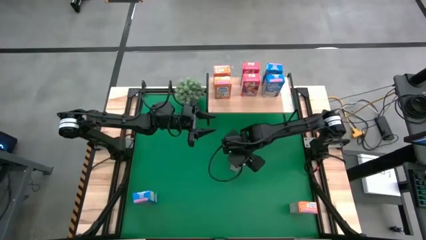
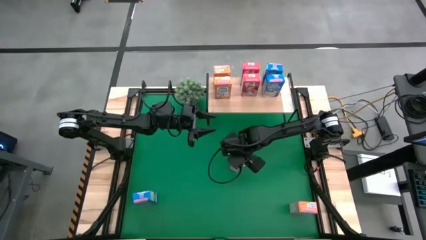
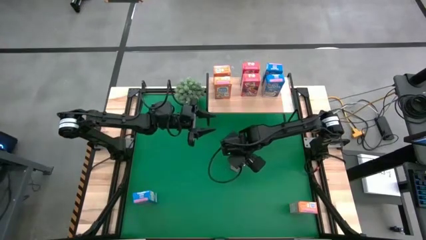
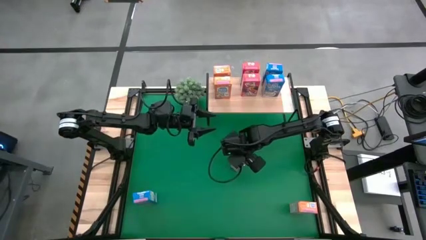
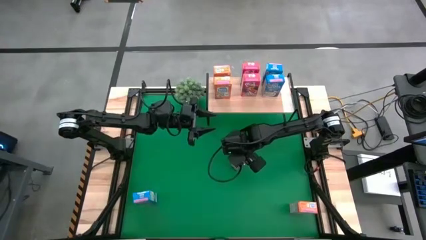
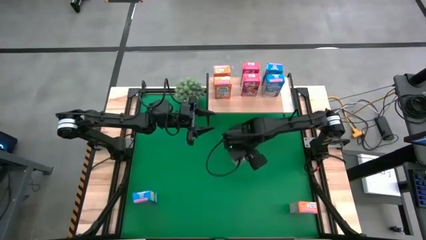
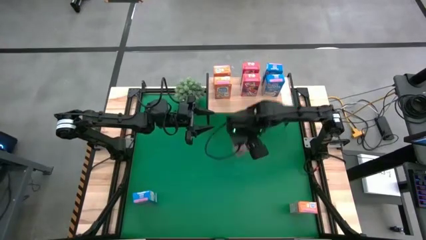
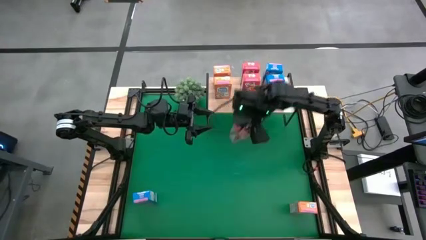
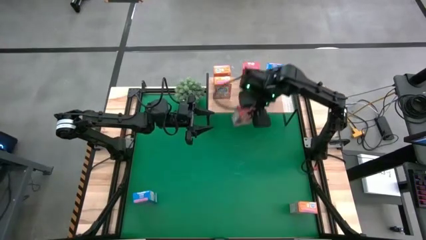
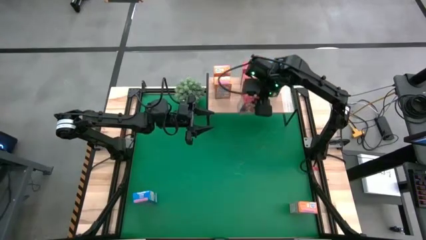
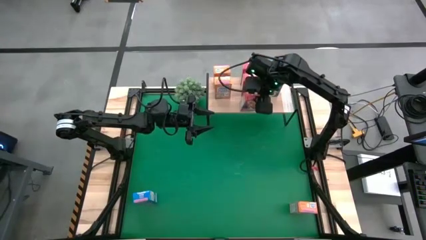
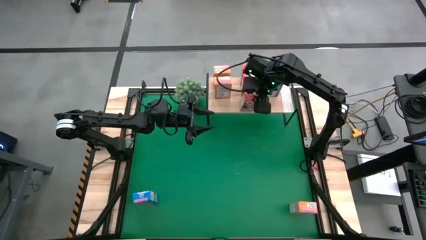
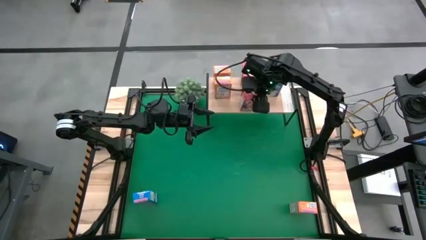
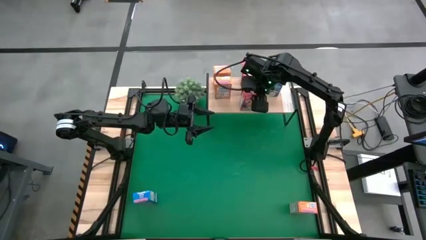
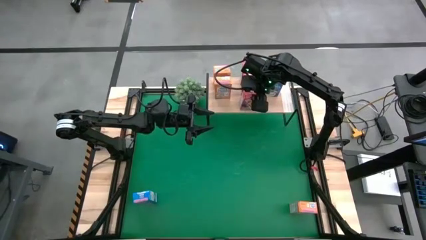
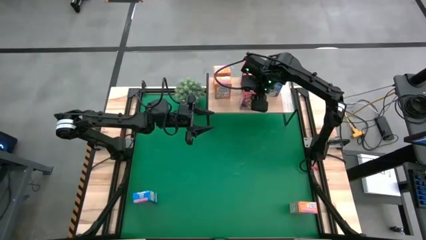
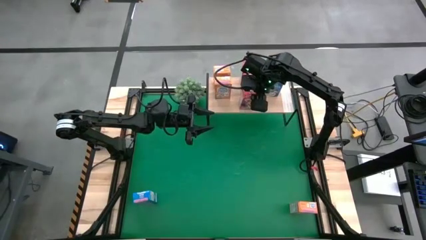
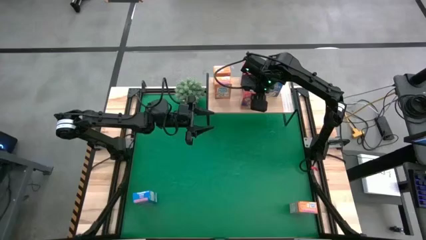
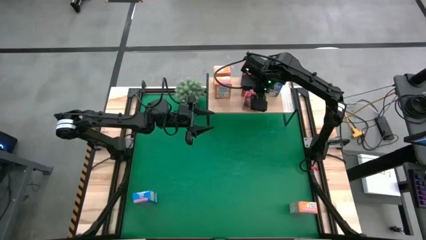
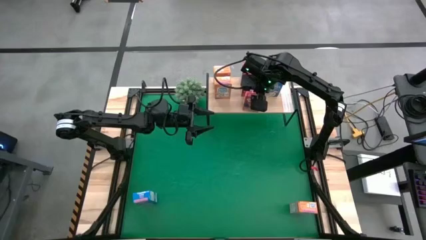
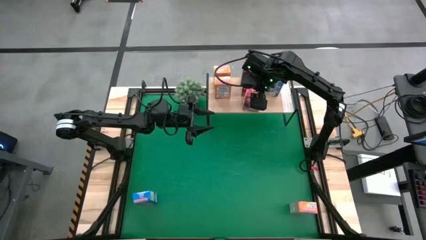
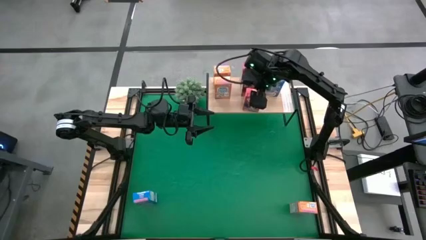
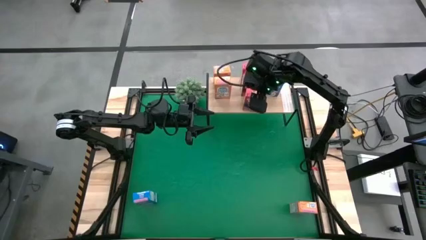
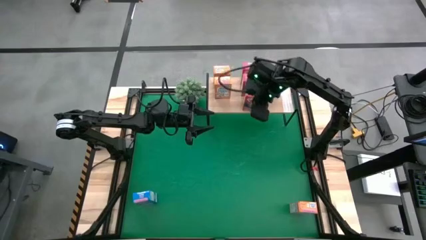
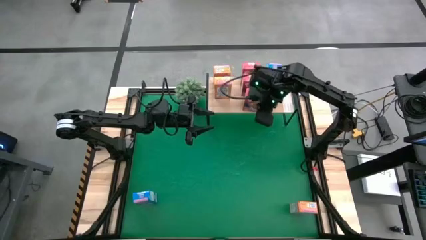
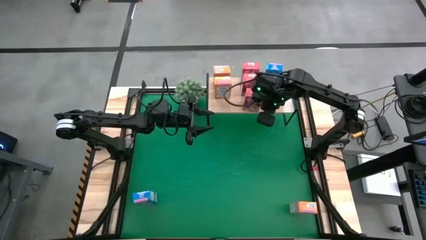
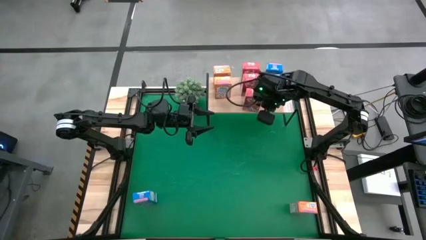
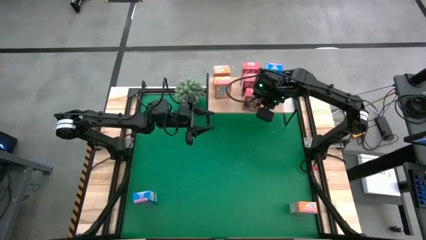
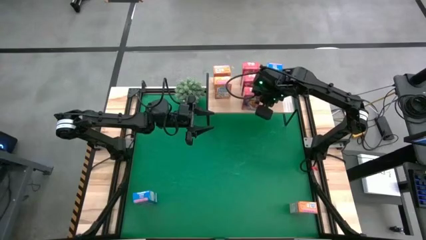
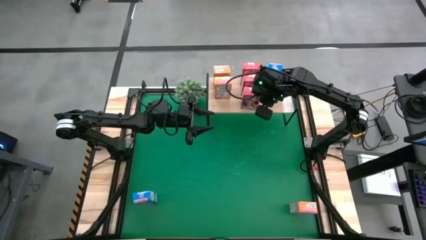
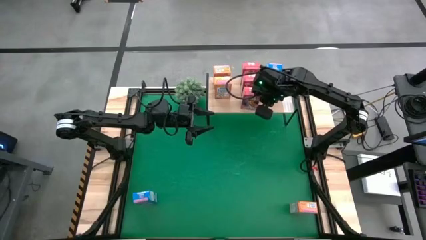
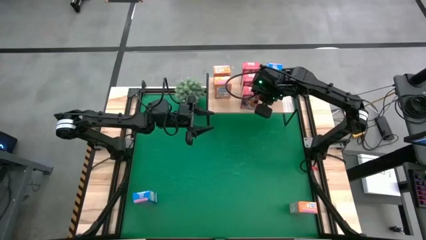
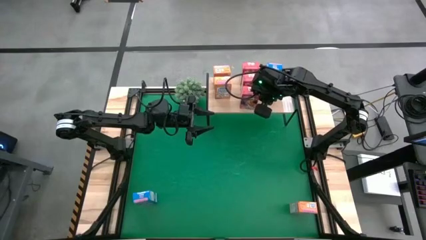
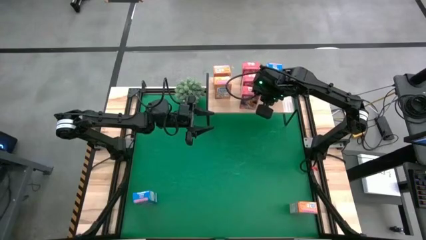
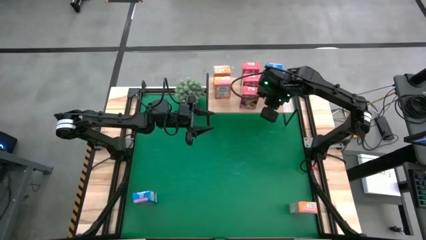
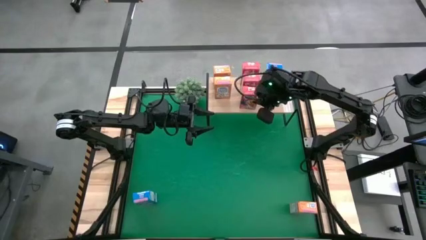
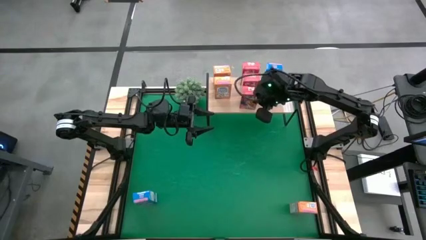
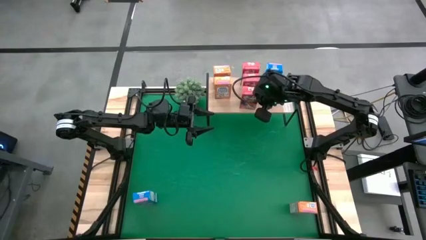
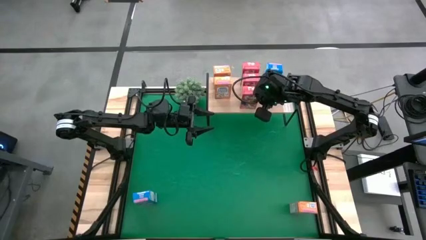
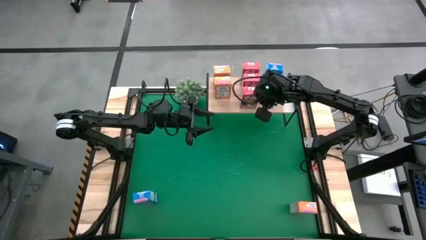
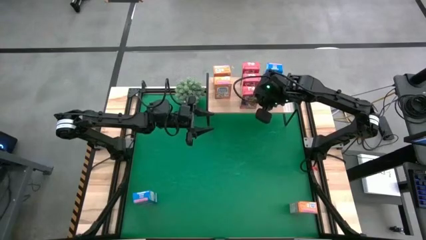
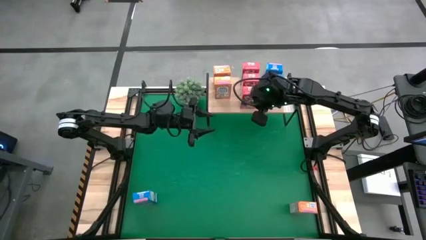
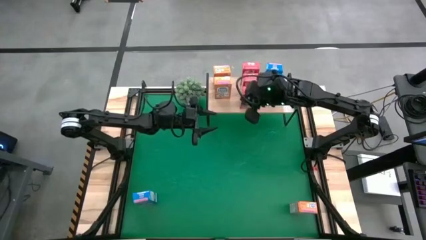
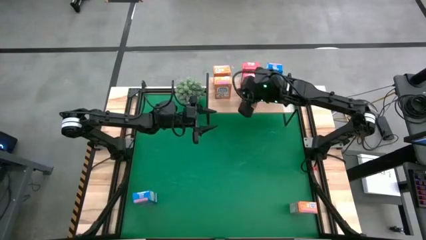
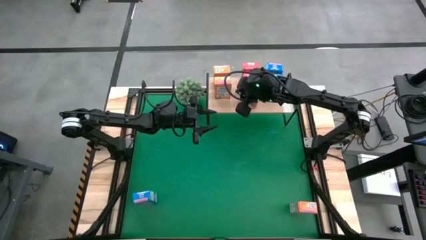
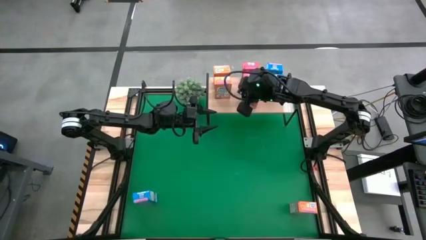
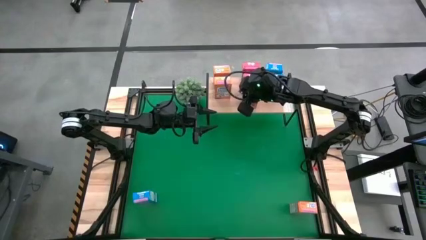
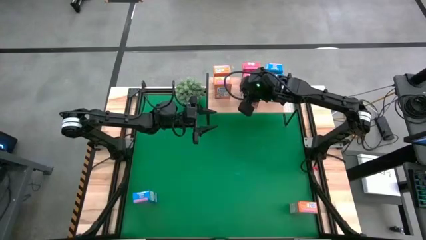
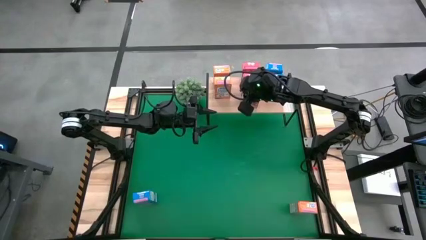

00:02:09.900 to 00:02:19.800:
Task: Stack cereal on shelf
Put the red cereal box on the shelf aligned with the other red cereal box

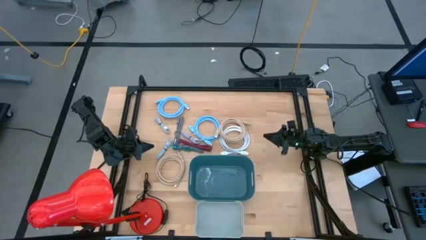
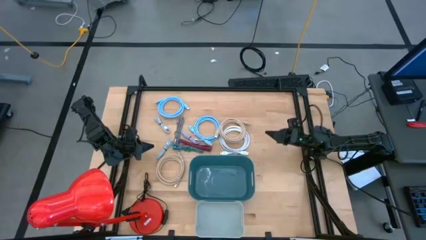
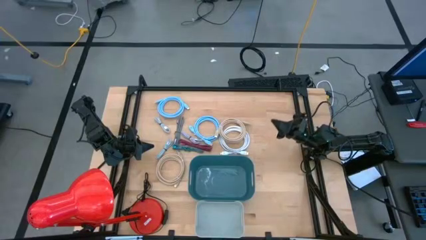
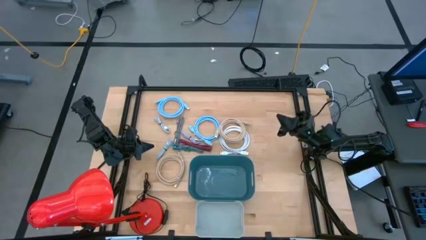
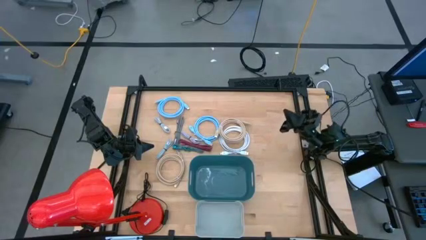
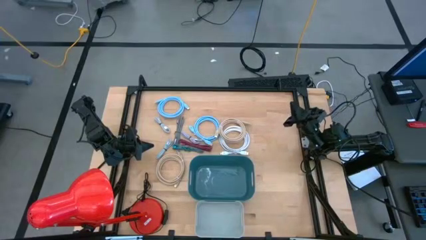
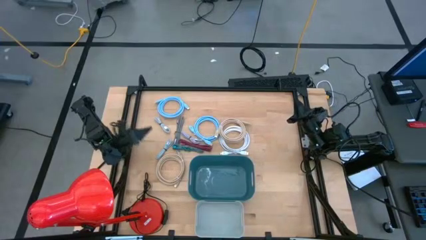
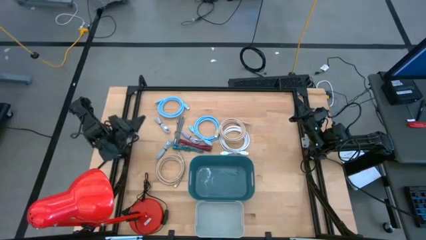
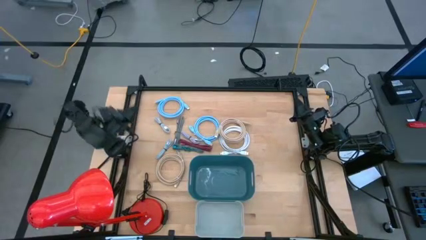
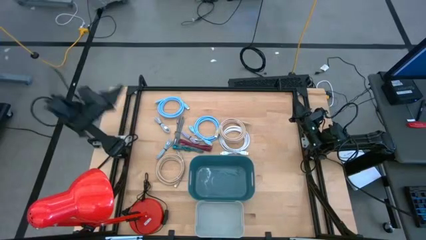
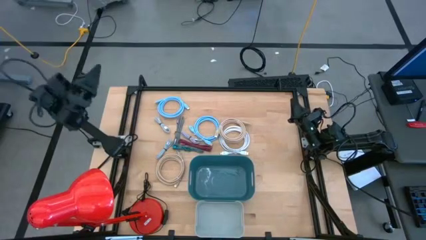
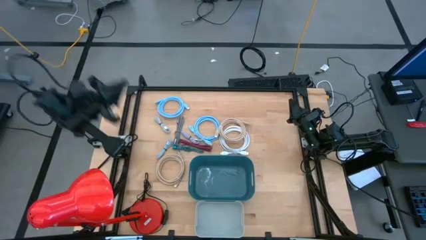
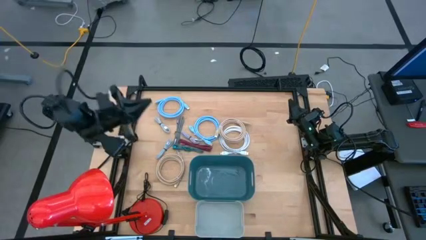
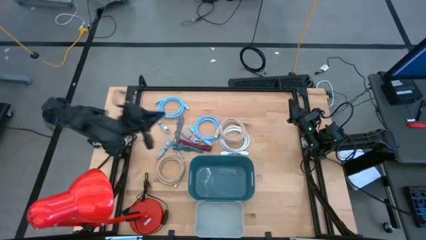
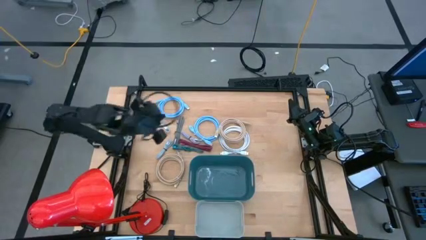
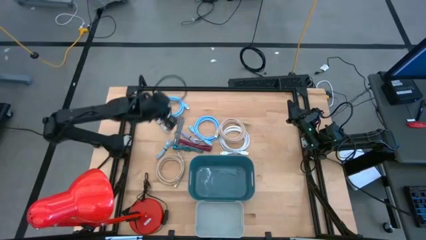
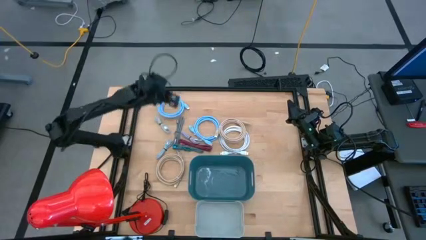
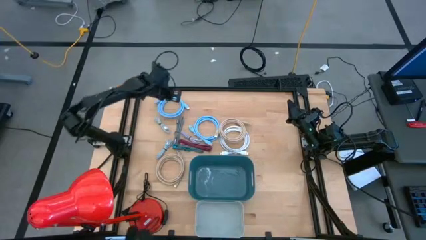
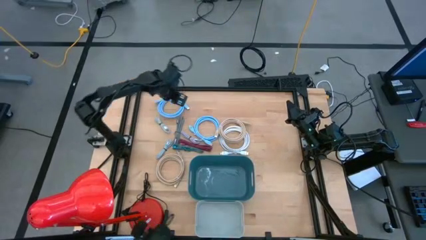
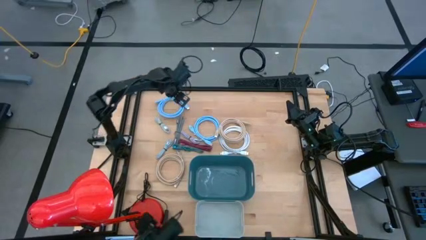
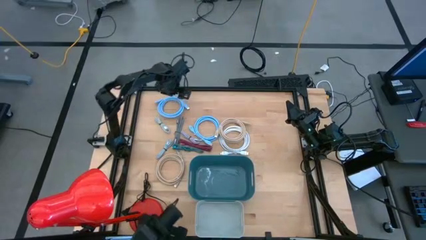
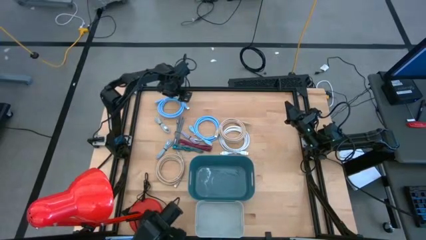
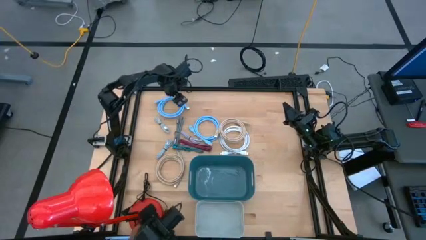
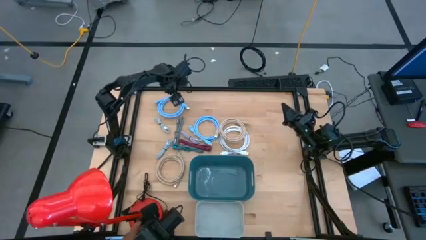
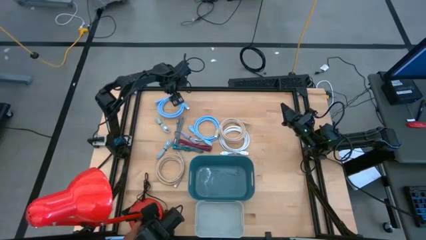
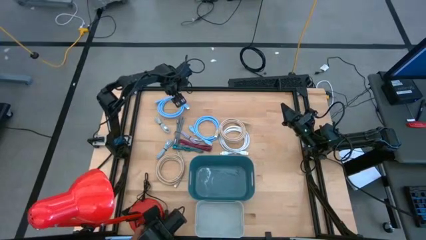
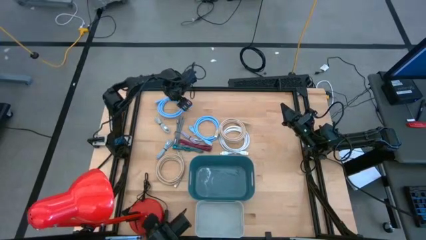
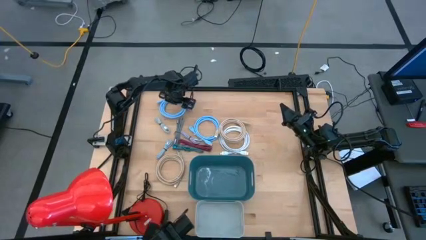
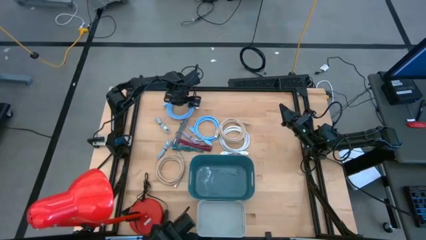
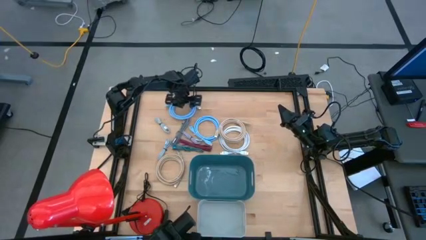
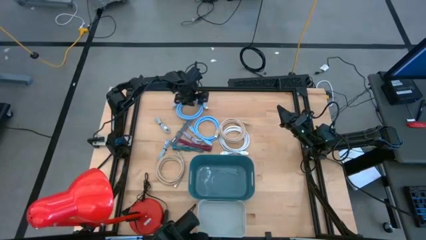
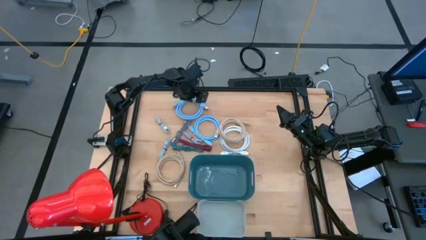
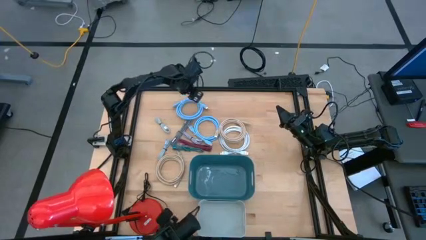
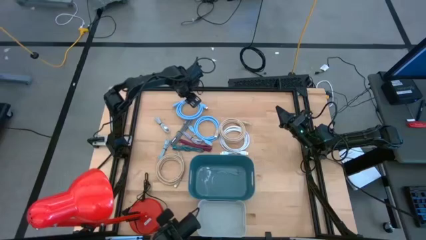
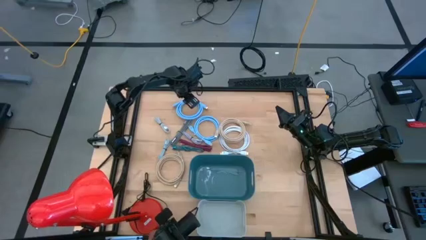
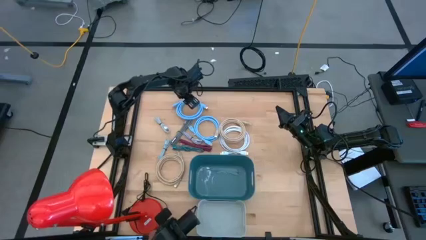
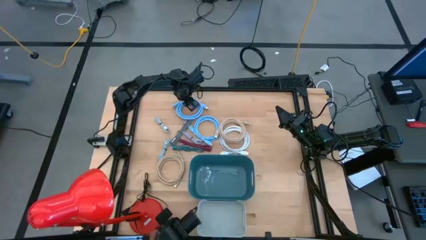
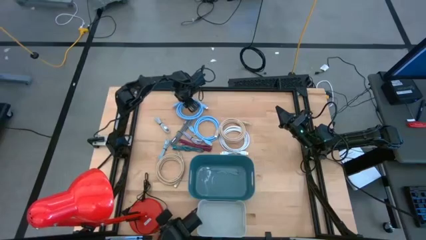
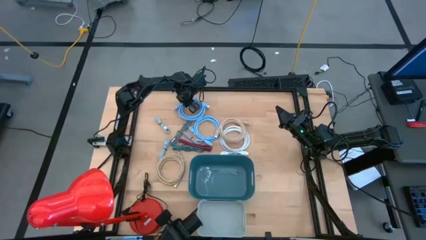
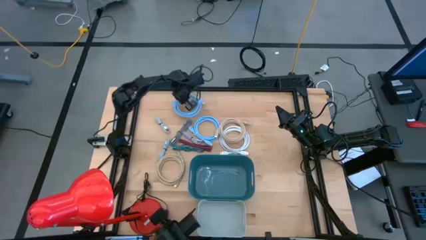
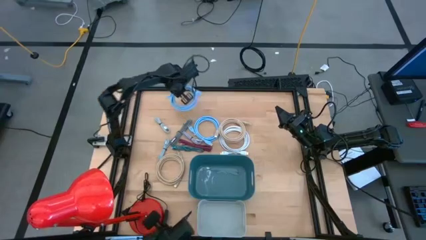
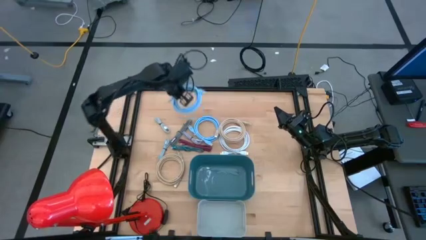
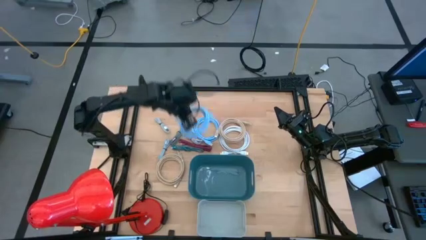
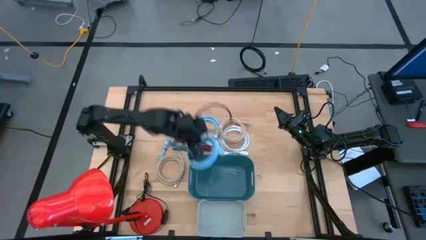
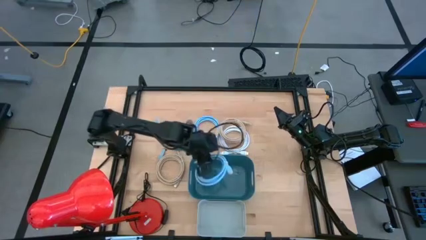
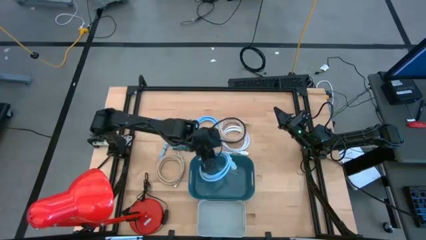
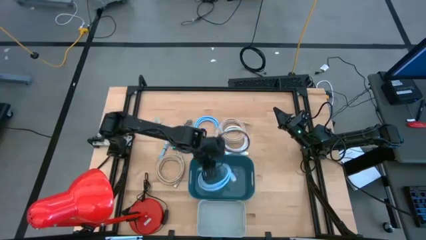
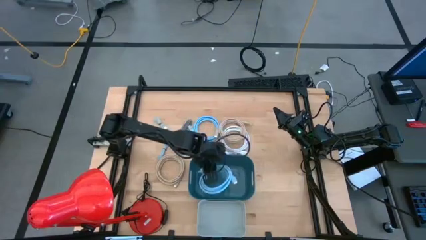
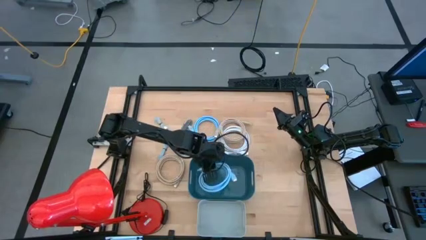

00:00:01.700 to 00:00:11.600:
Task: Pick & Place USB Port
Put the top blue HDMI cable into the blue bin
